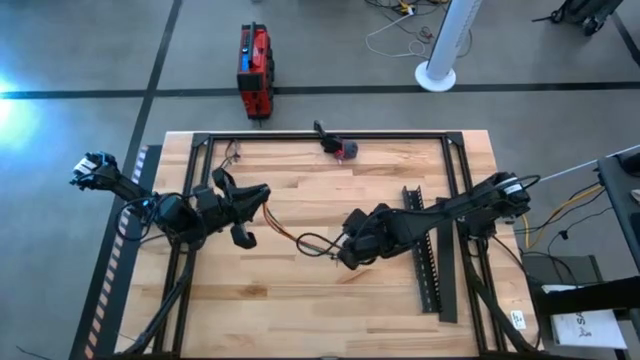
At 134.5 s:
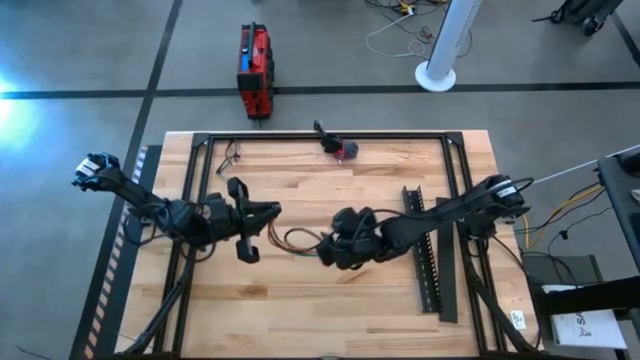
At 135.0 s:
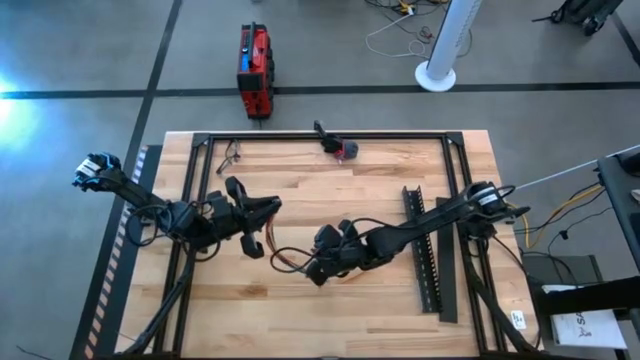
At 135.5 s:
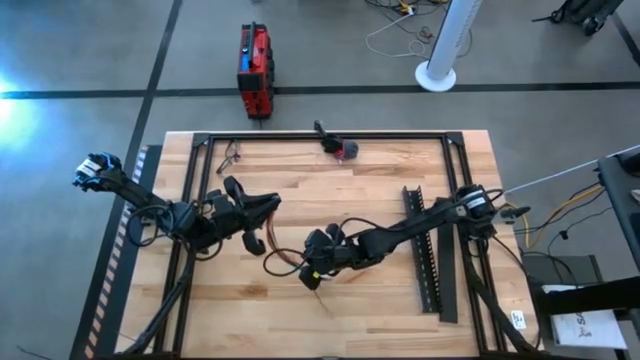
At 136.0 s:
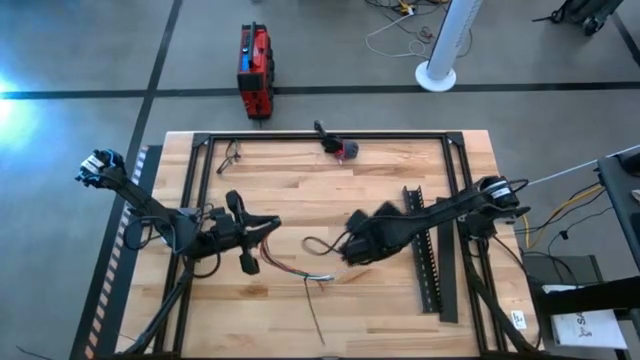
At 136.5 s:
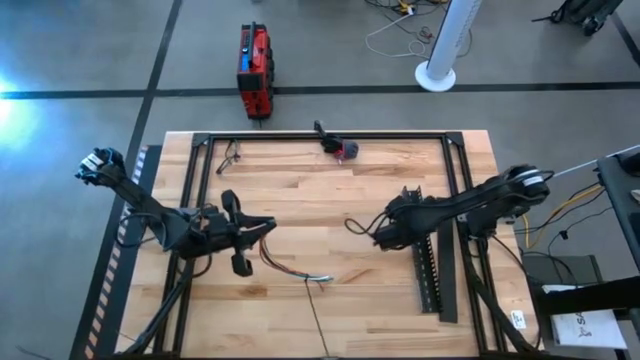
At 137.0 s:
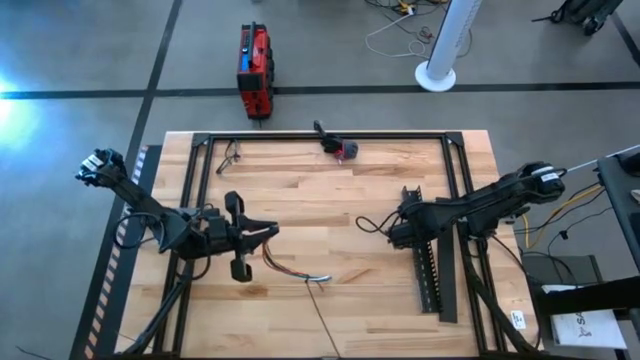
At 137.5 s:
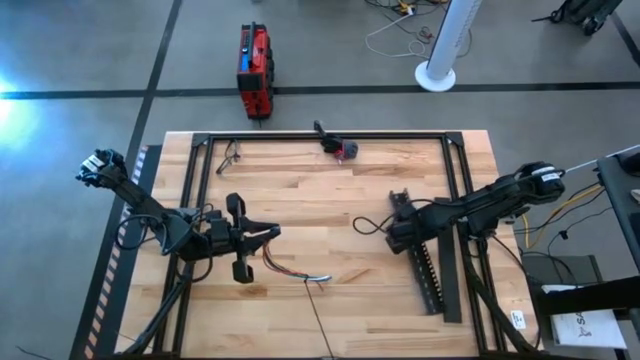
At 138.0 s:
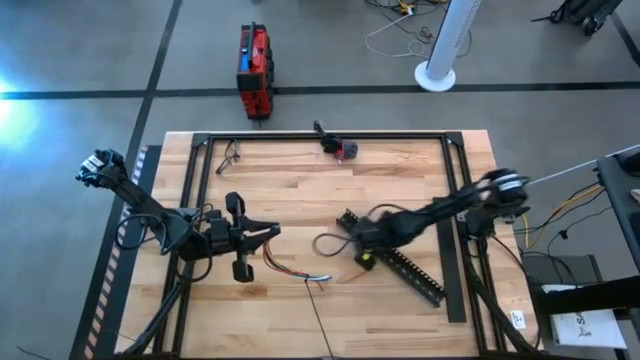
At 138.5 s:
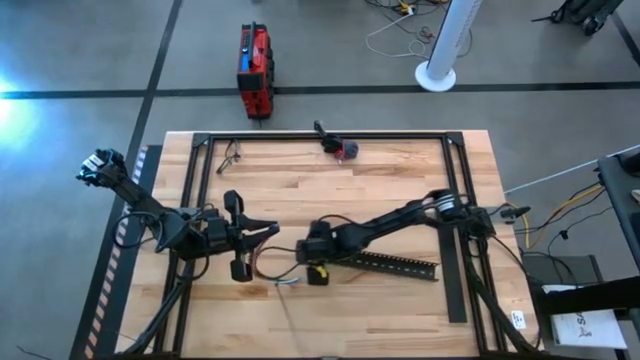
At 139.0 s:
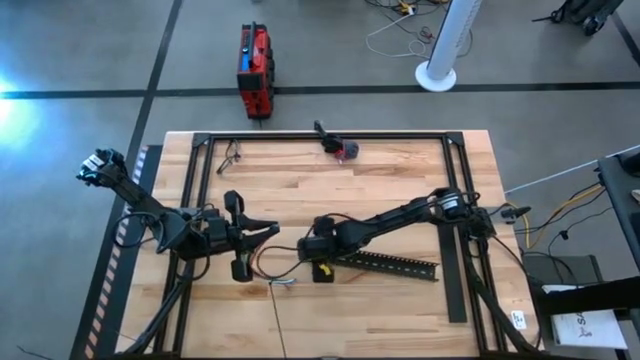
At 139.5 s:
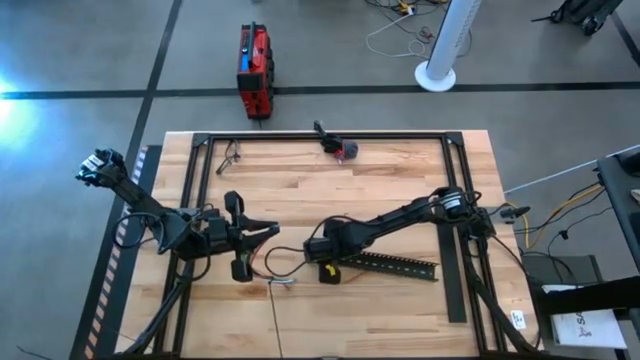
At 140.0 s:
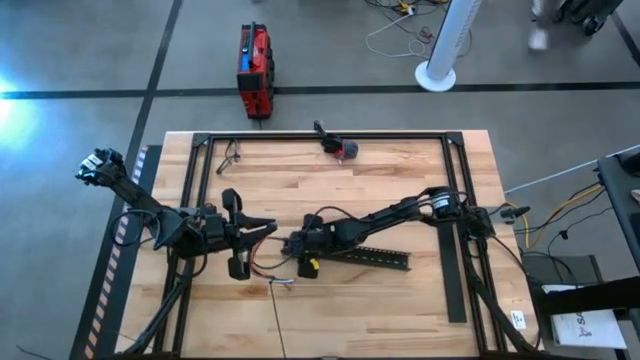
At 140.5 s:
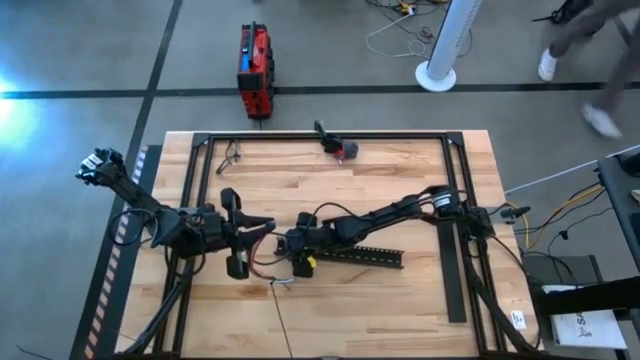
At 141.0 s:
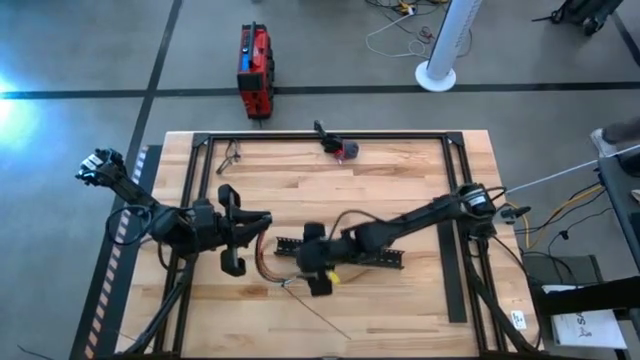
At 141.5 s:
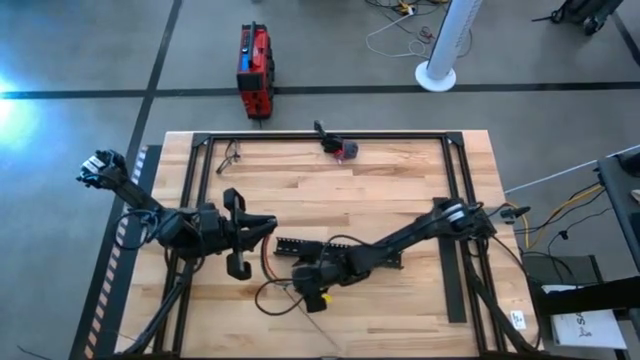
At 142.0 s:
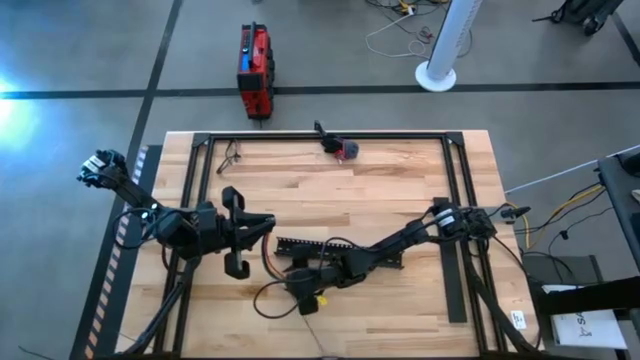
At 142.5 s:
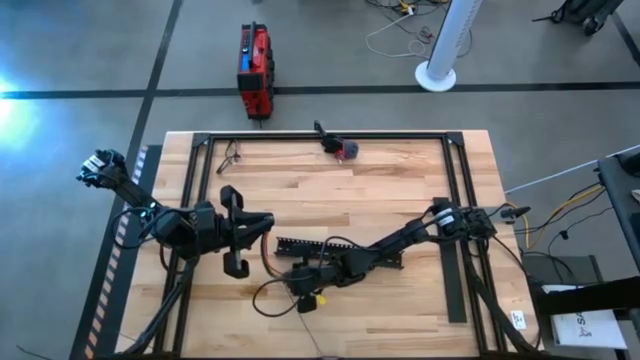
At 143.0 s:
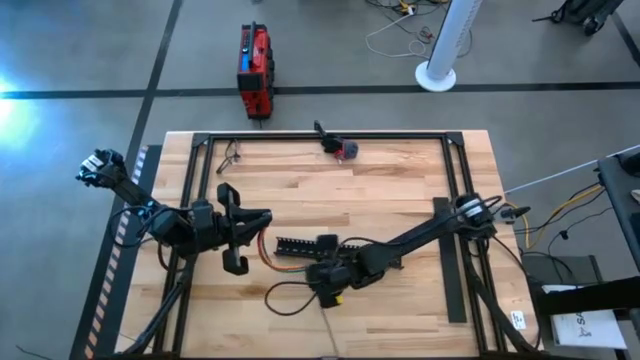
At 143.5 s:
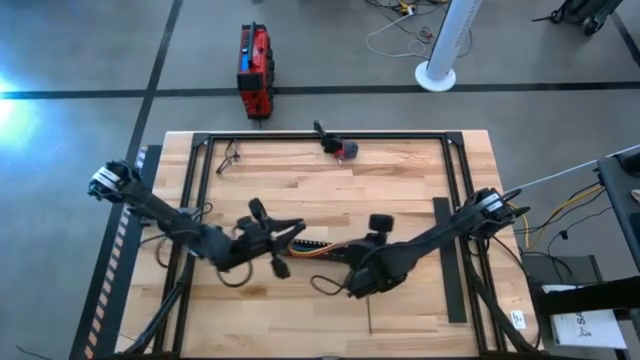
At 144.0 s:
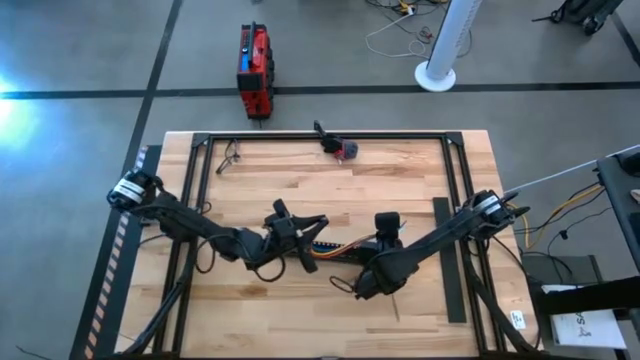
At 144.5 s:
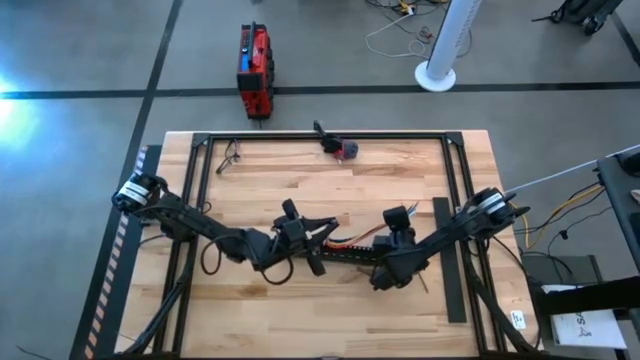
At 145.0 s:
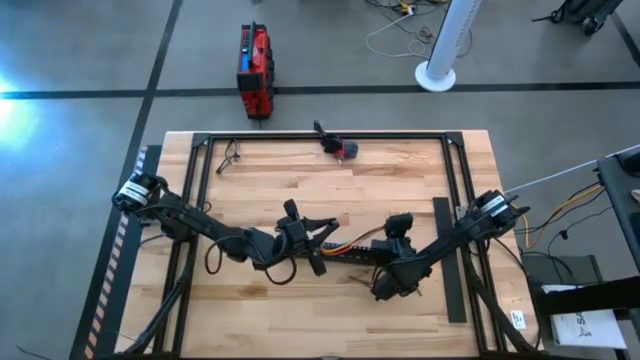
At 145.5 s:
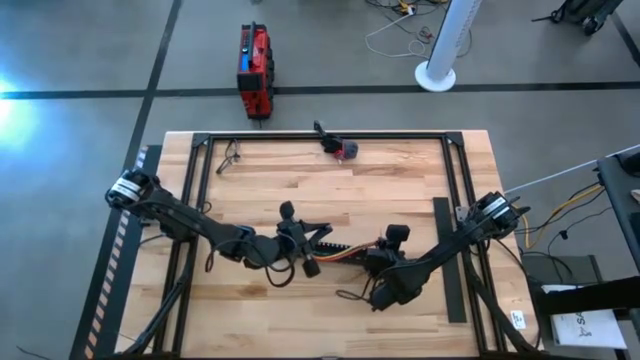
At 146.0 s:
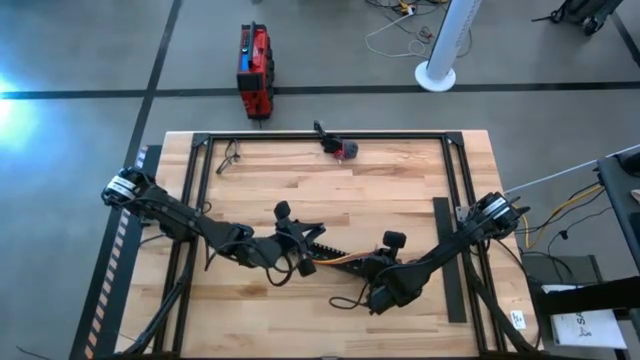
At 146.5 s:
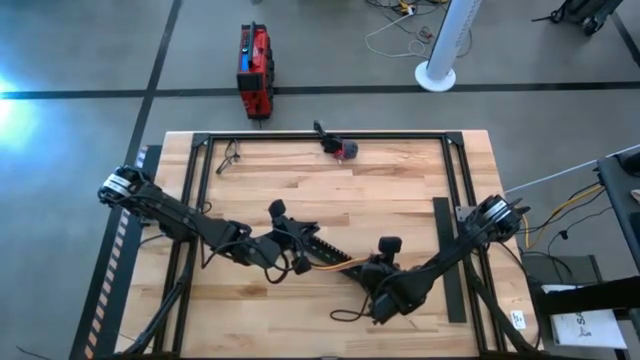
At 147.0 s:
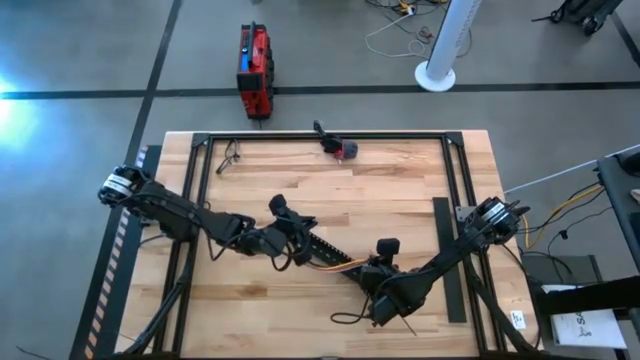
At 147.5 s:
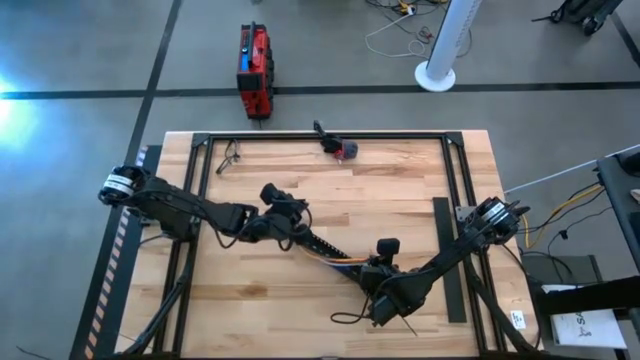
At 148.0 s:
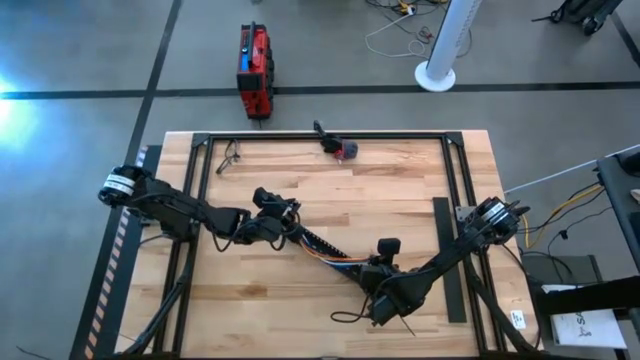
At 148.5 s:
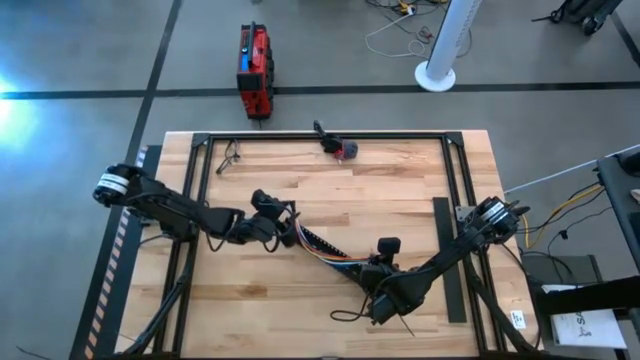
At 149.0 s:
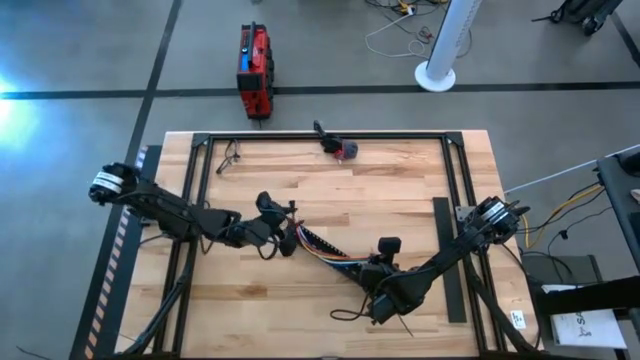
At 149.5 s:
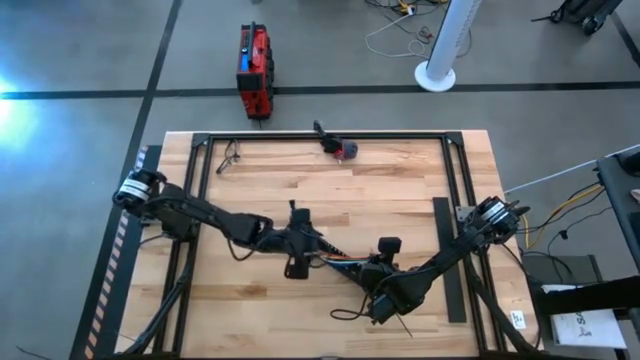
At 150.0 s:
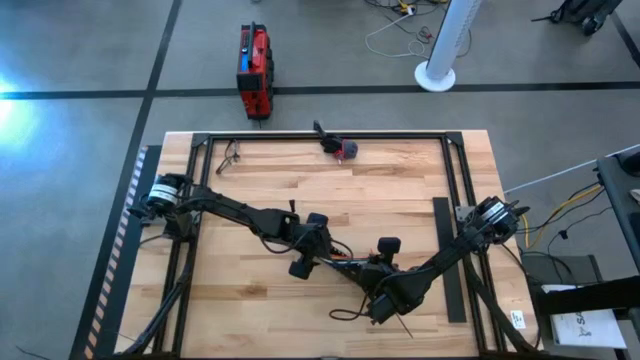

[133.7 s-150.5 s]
Task: Ziptie cables
Put the wires into the black cable duct

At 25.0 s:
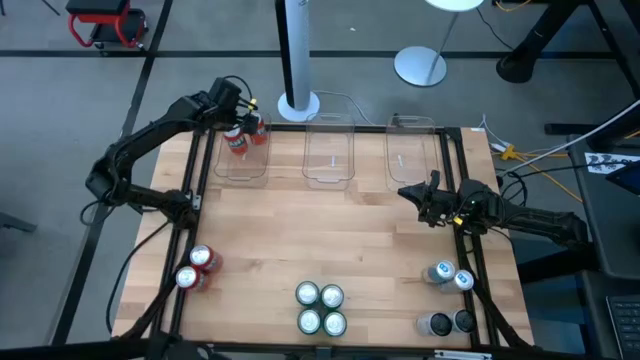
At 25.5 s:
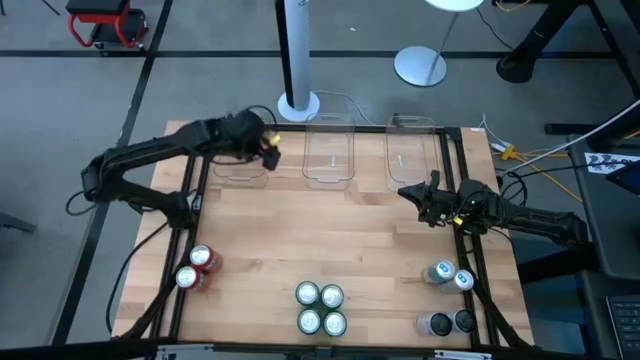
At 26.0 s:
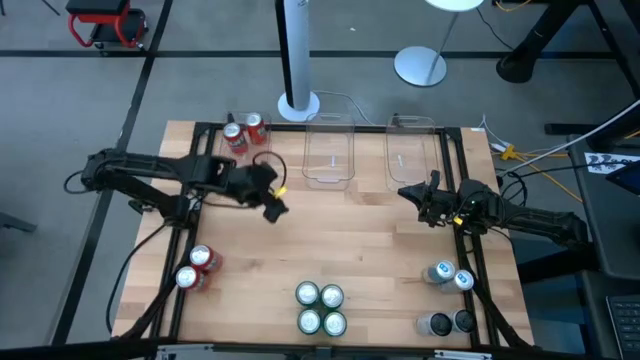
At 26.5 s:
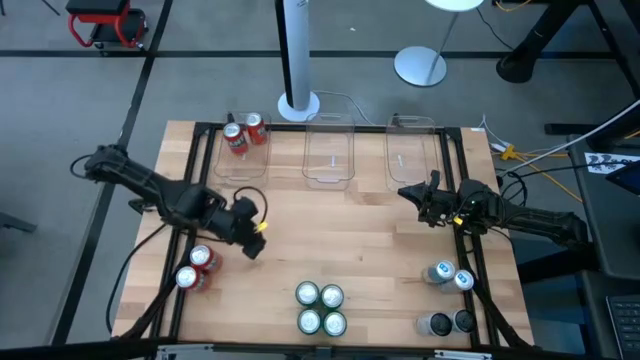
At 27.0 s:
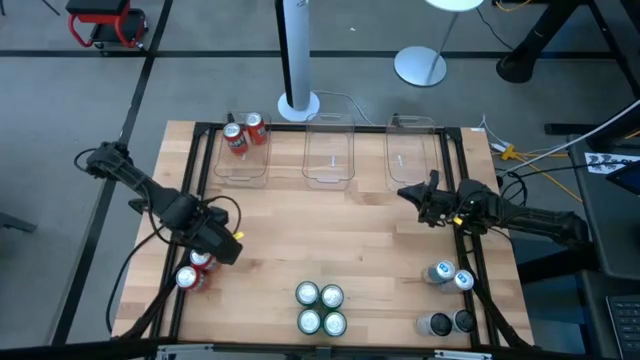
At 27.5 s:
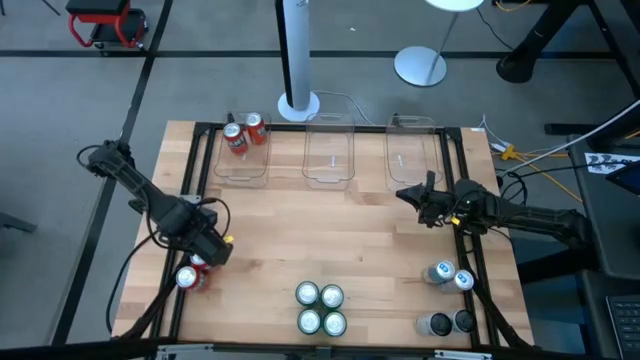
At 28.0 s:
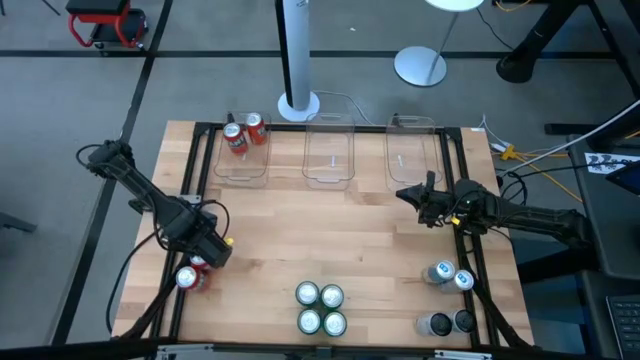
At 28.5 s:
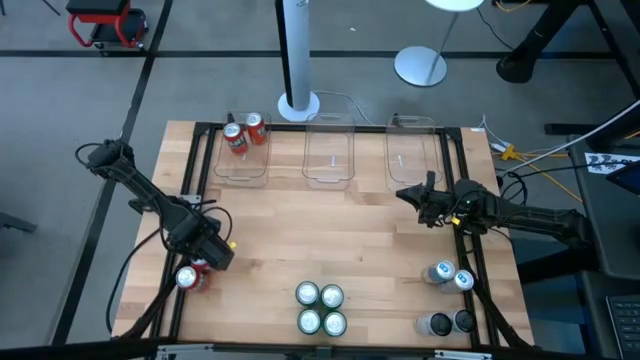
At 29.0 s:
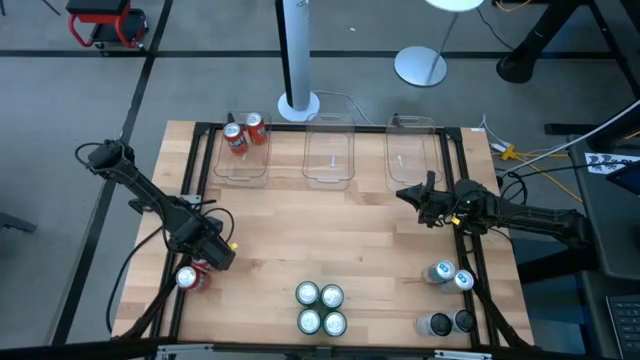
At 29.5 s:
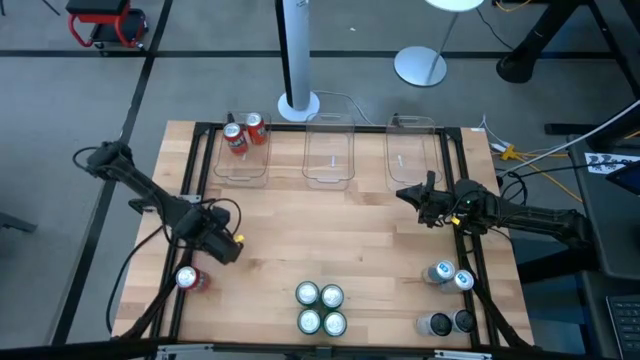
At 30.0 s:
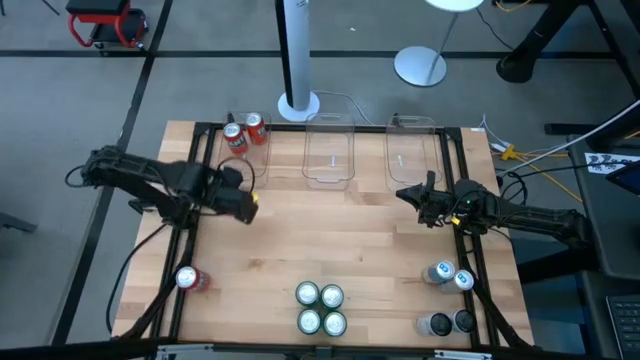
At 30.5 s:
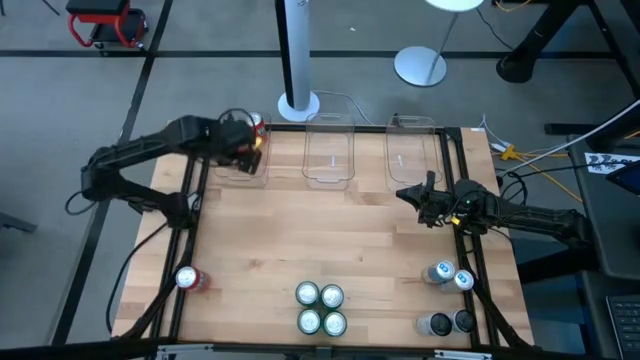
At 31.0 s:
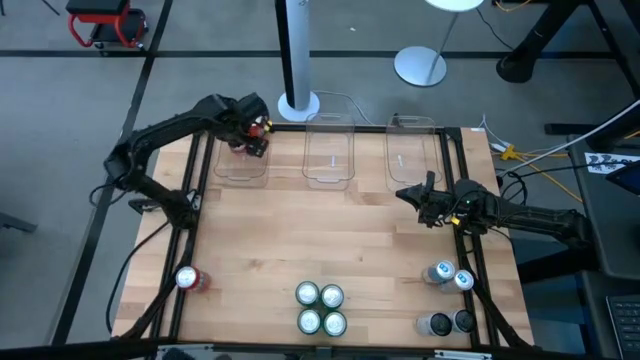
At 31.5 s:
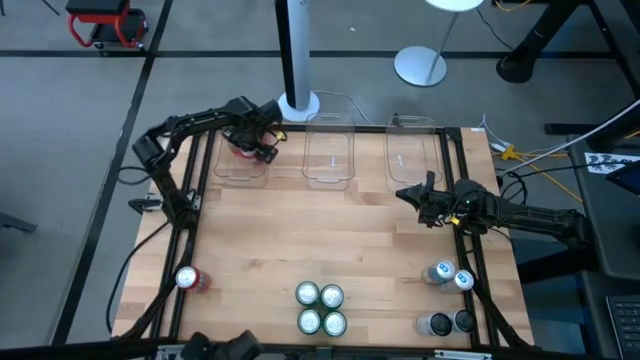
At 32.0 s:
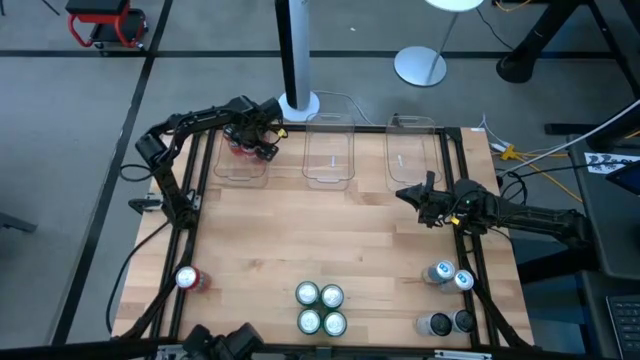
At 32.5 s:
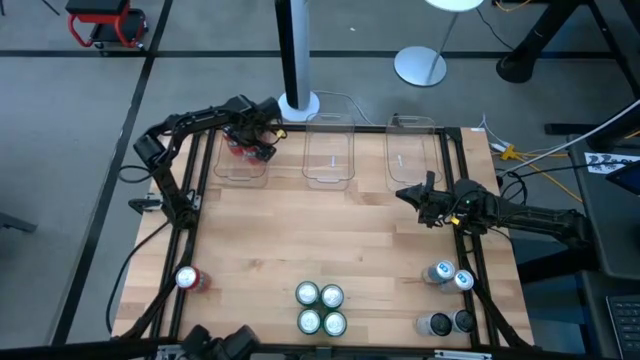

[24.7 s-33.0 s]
Task: Sort soda cans
Put the top orange soda can into the left transparent bin
